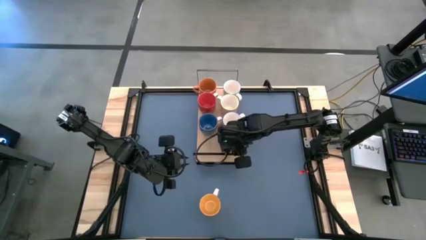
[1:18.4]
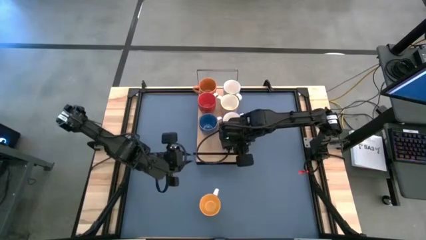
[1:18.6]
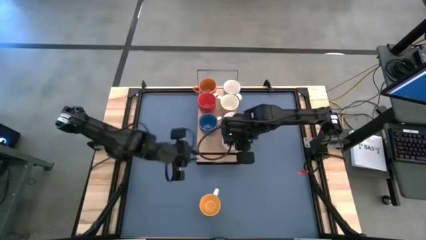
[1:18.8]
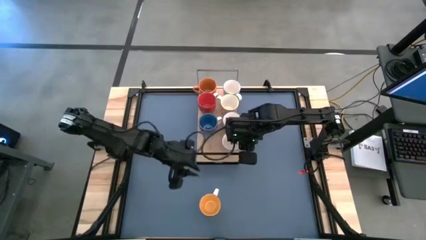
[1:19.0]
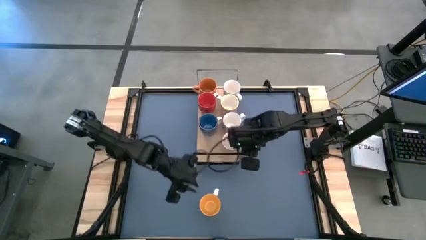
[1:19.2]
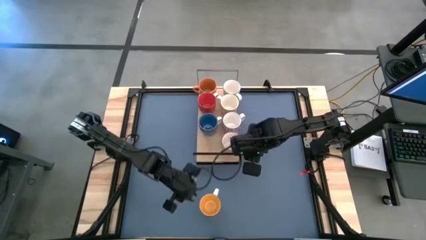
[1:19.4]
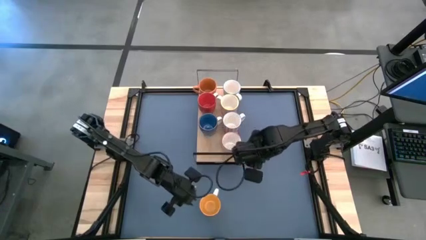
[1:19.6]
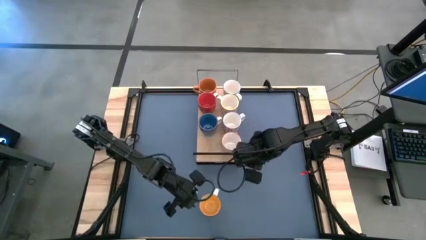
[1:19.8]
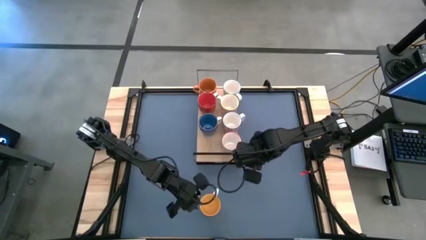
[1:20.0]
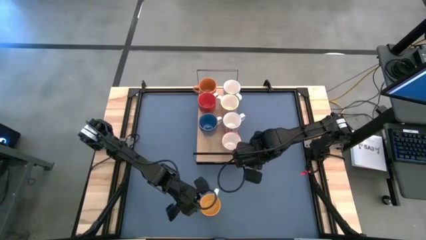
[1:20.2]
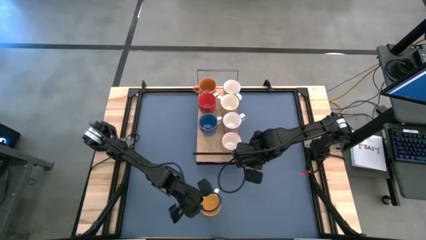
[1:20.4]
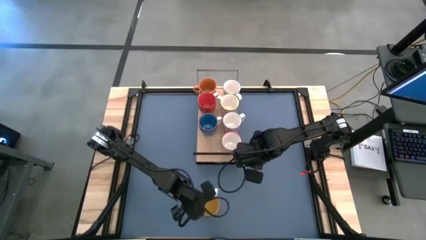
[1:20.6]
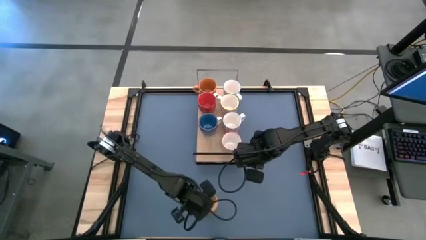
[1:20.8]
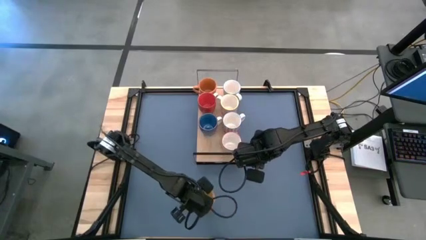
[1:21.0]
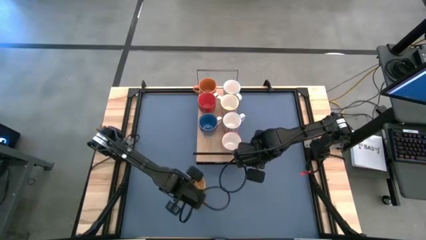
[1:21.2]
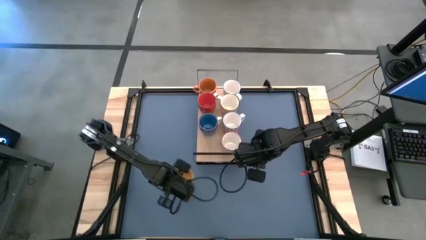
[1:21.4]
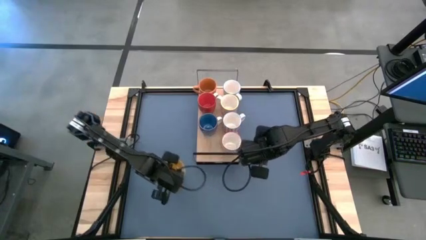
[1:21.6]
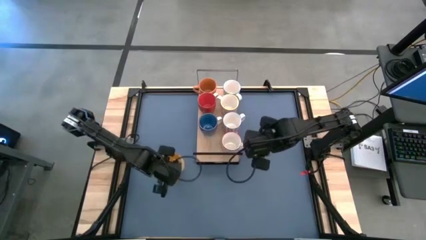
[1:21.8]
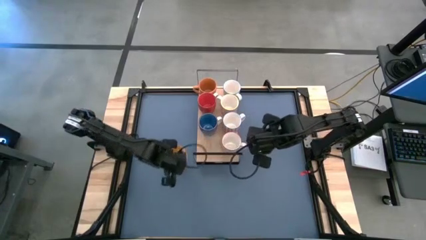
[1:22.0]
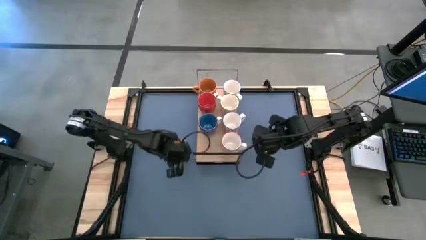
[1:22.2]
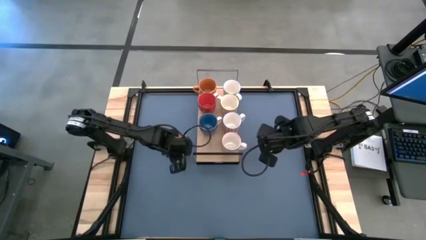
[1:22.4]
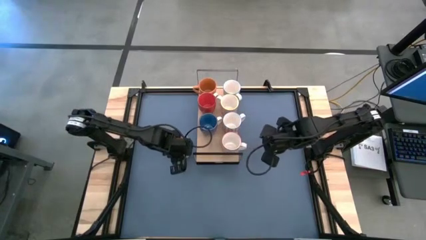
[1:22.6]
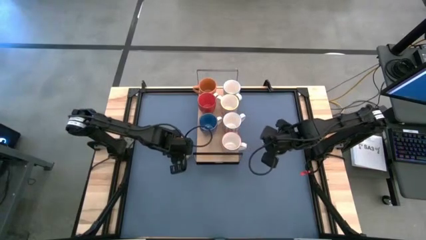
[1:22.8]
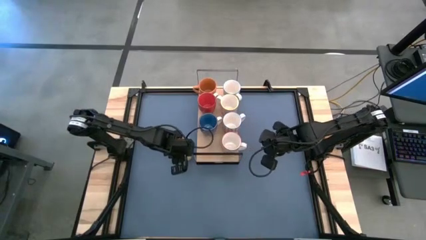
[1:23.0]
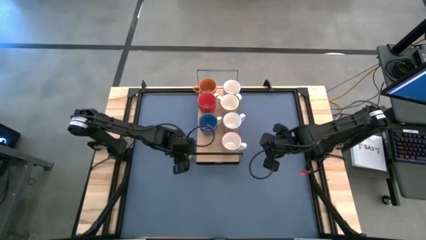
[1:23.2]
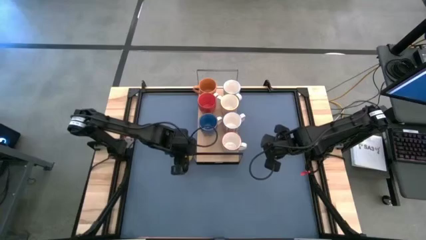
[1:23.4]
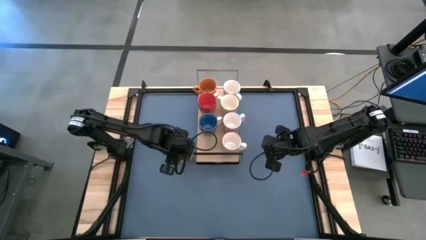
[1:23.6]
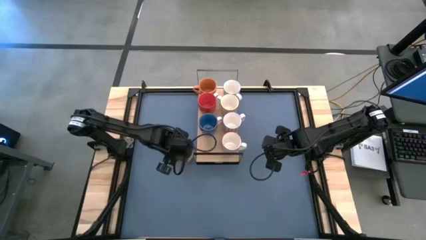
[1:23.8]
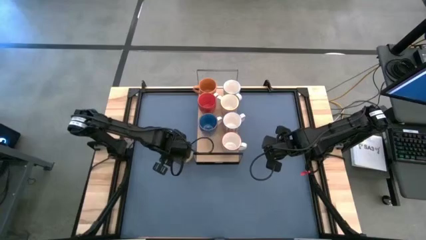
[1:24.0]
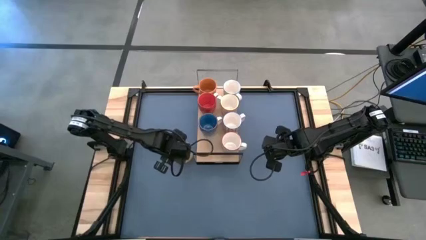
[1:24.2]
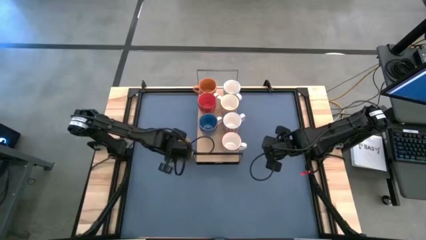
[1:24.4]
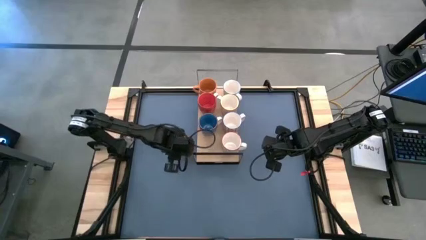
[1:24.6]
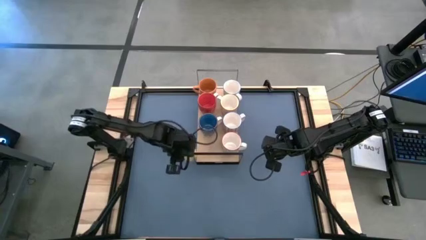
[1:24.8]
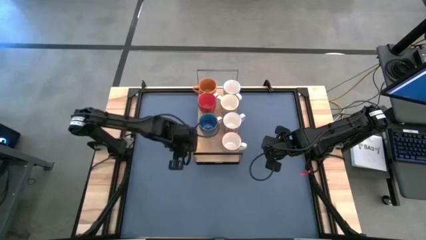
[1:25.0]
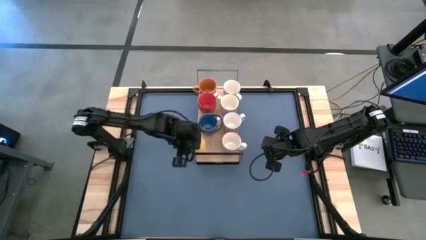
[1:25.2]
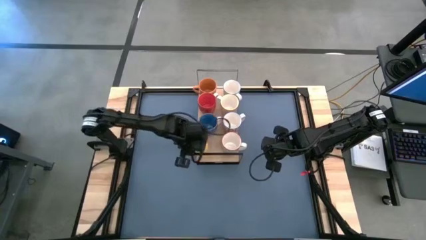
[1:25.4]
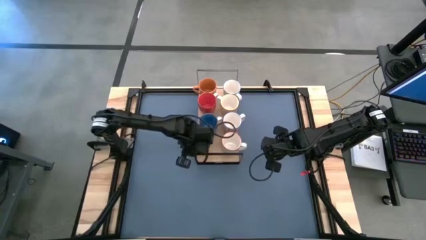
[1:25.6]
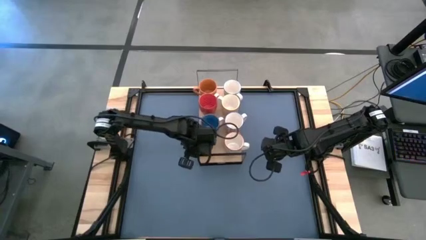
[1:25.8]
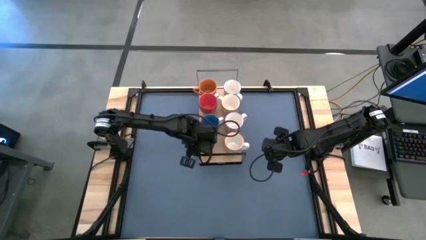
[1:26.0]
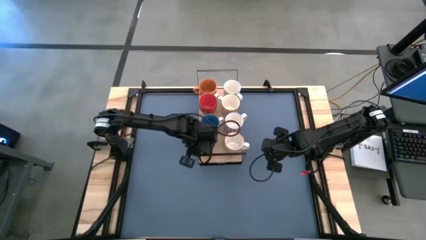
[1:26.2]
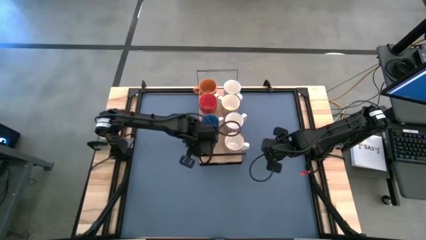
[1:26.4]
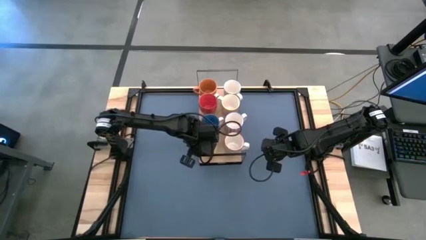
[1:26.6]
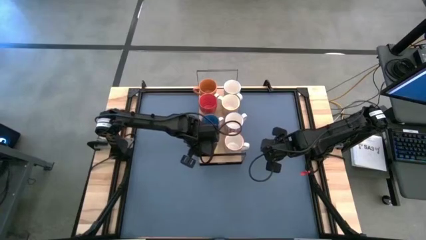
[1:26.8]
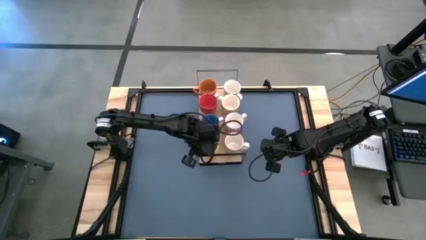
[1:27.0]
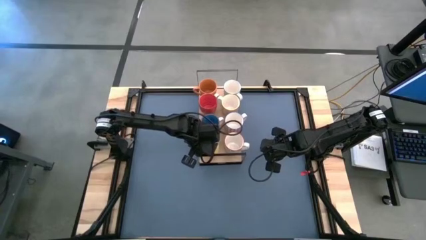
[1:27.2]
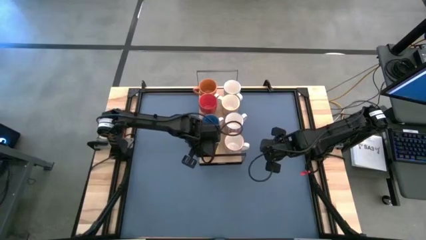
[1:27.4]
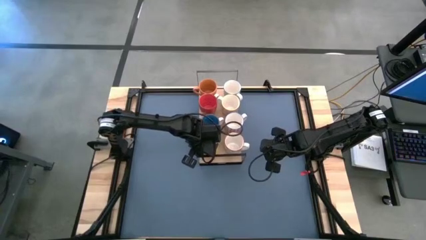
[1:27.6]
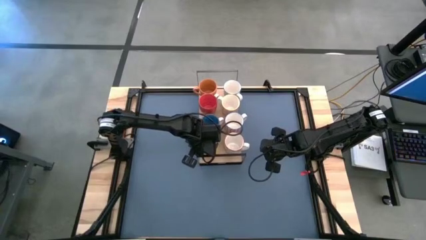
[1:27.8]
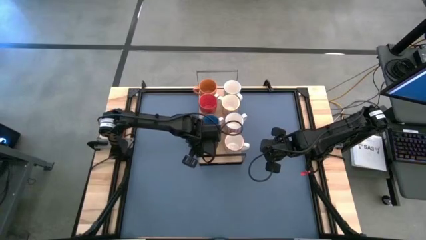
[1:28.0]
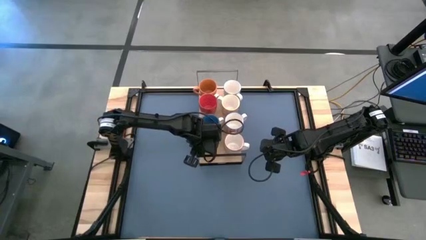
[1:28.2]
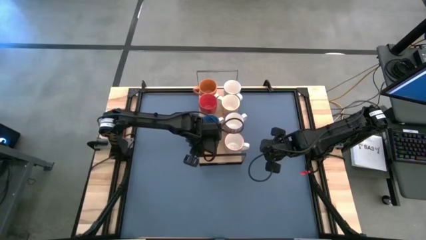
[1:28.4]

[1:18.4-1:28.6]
Task: Place coffee mugs
Put the yellow mug on the shelf
